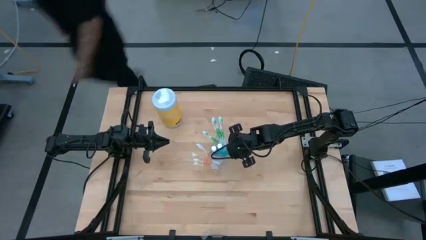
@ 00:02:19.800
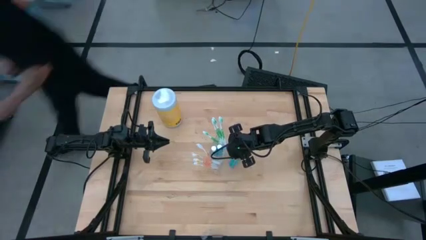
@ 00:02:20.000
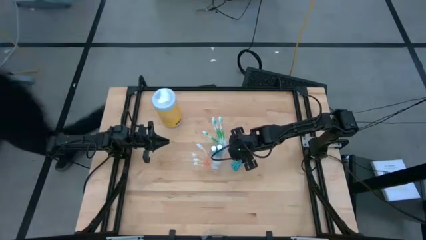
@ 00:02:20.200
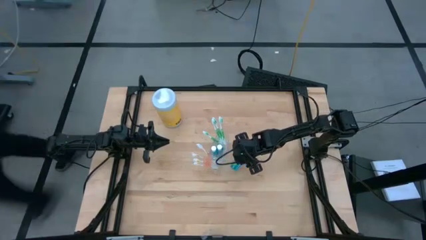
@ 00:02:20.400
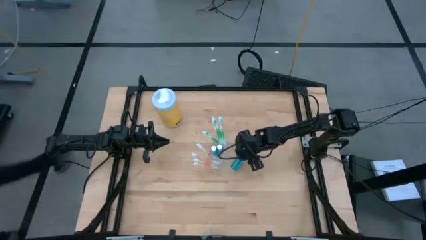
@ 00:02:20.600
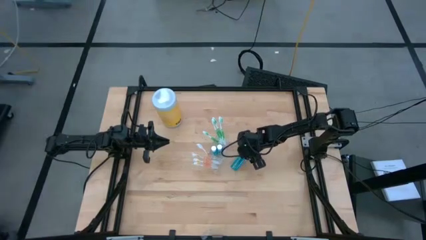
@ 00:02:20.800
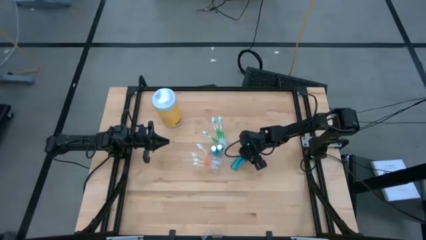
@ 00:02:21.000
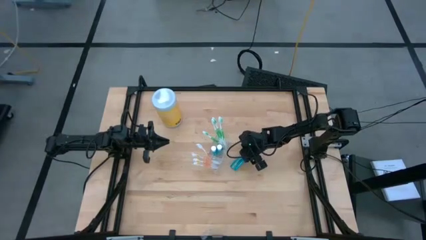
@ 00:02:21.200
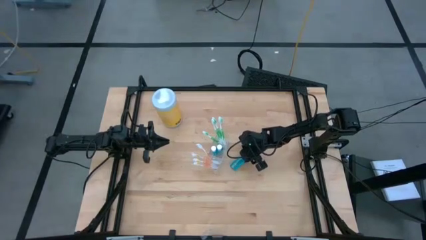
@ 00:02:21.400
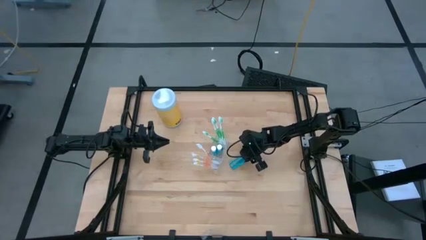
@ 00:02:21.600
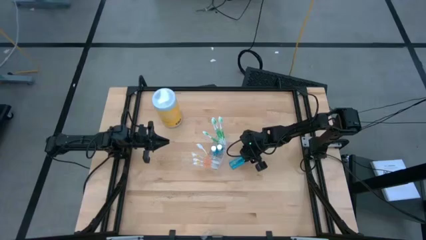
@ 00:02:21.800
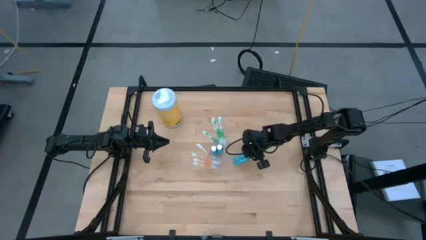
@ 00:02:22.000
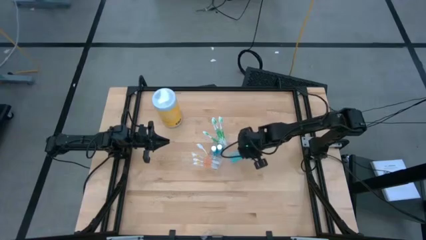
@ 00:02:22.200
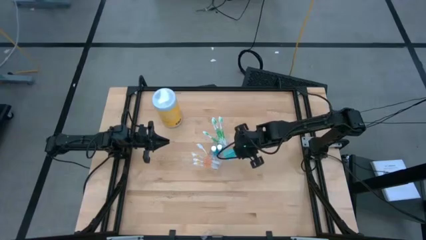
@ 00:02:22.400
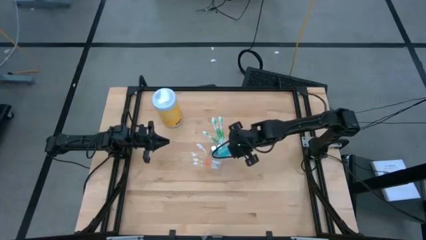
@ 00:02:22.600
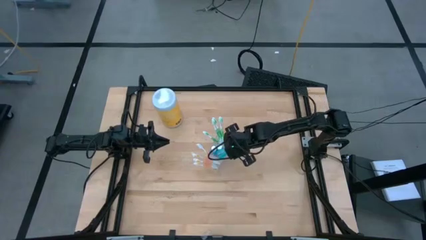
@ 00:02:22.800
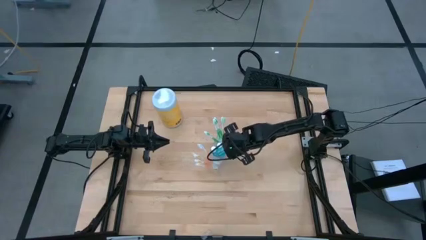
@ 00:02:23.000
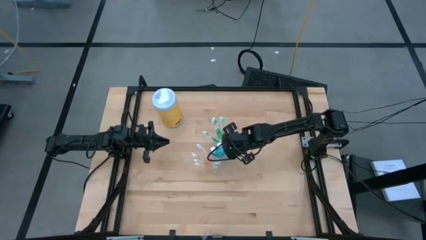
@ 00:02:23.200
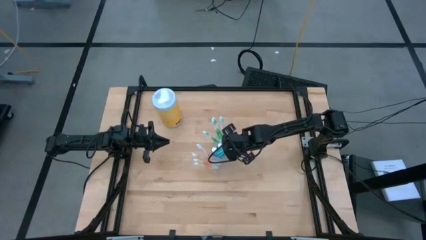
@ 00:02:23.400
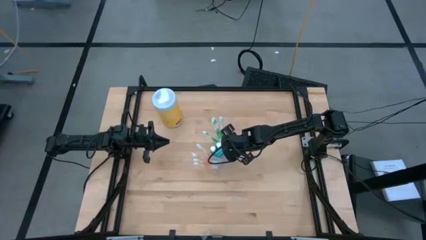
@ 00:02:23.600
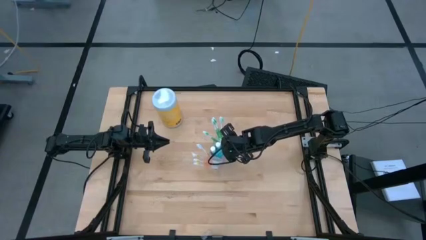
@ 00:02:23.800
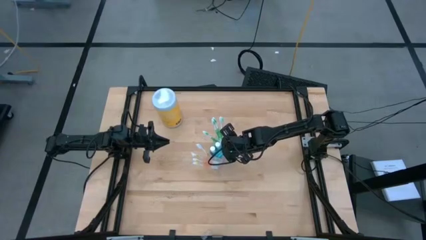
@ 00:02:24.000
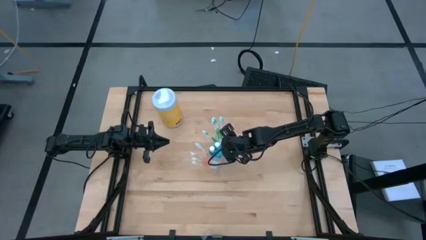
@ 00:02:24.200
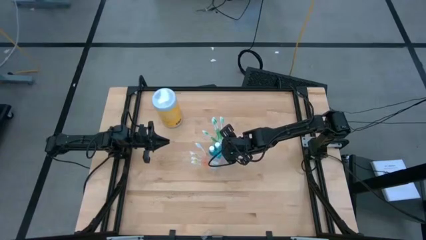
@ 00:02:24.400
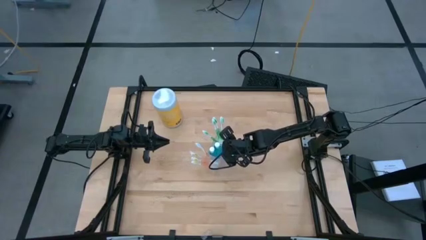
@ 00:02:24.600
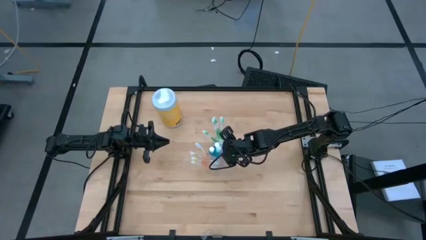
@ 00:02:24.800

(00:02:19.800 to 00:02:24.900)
Task: Pick & Place toothbrushing station
Put the blue mouthwash bottle into the transparent organizer

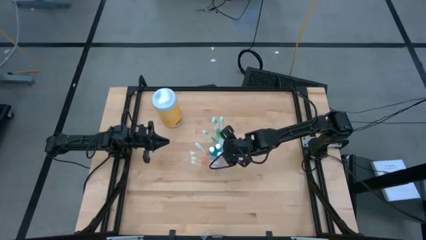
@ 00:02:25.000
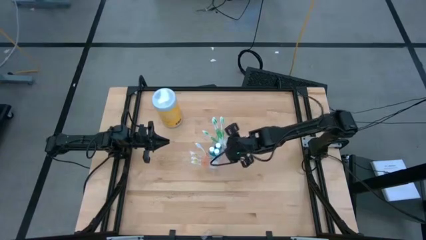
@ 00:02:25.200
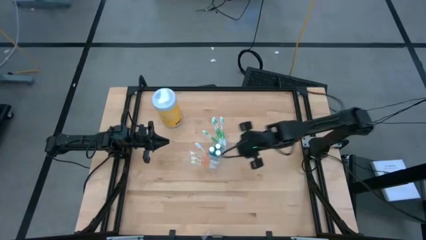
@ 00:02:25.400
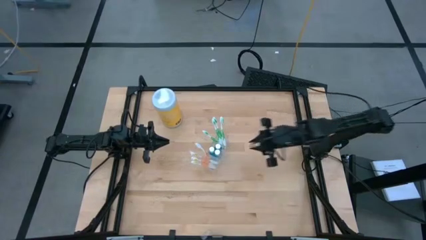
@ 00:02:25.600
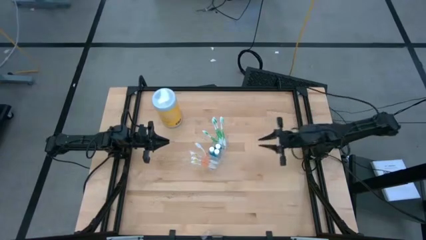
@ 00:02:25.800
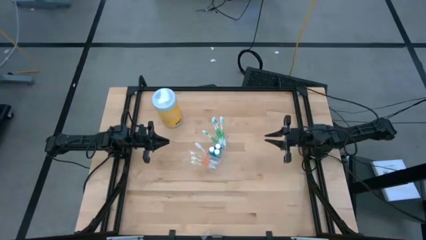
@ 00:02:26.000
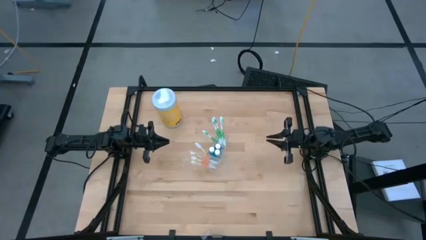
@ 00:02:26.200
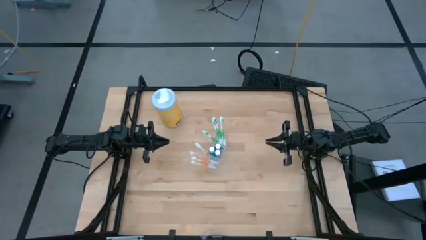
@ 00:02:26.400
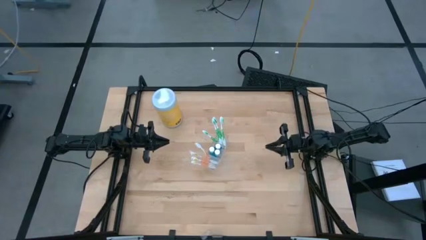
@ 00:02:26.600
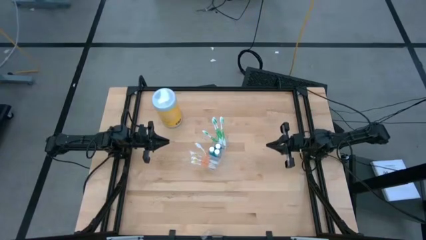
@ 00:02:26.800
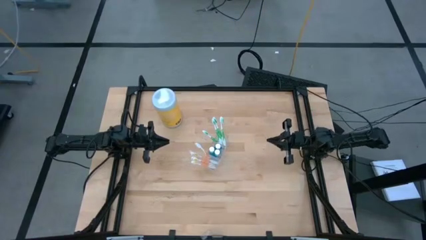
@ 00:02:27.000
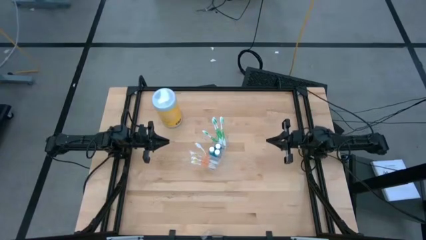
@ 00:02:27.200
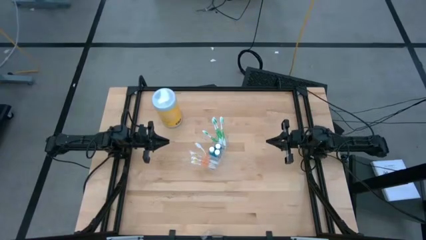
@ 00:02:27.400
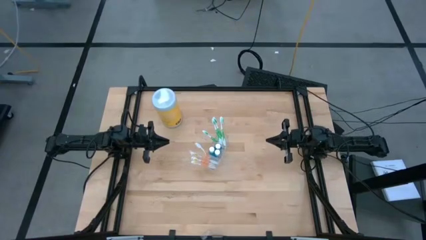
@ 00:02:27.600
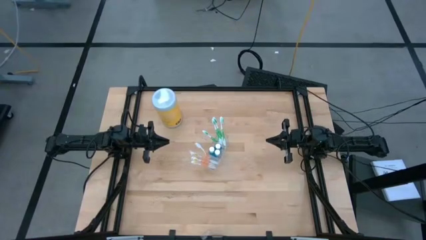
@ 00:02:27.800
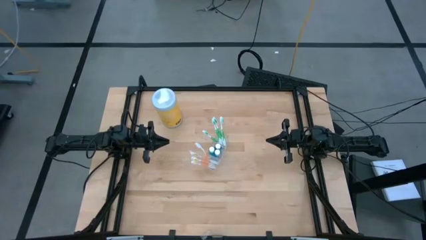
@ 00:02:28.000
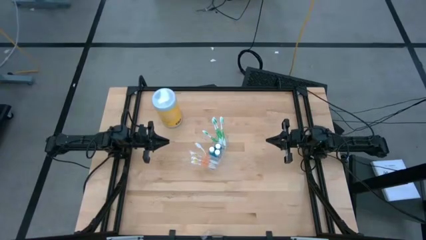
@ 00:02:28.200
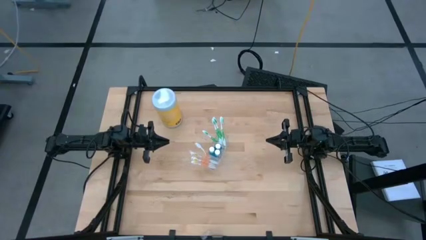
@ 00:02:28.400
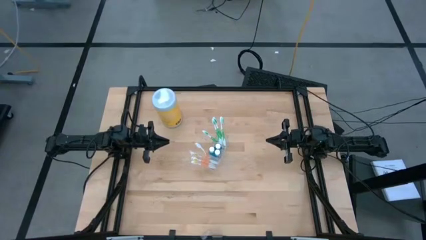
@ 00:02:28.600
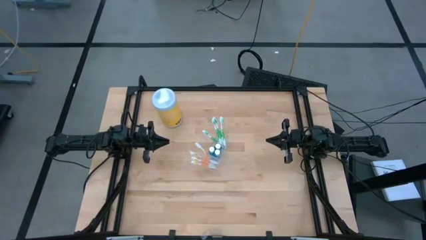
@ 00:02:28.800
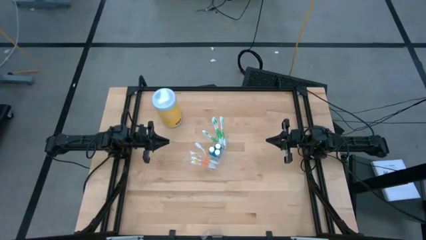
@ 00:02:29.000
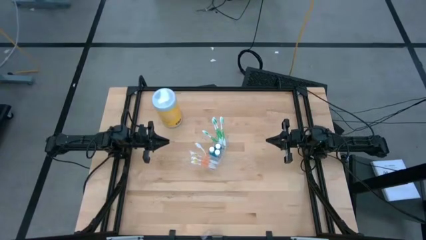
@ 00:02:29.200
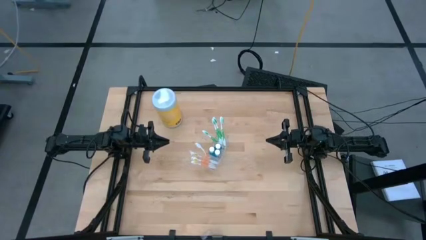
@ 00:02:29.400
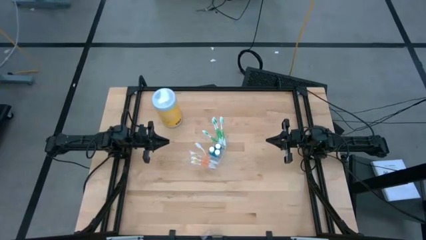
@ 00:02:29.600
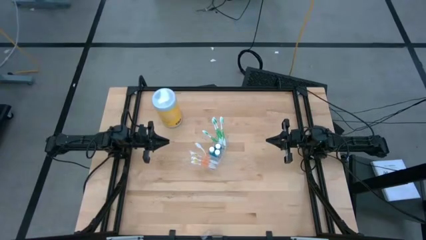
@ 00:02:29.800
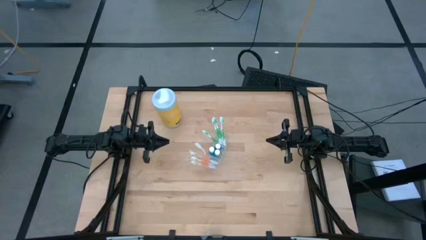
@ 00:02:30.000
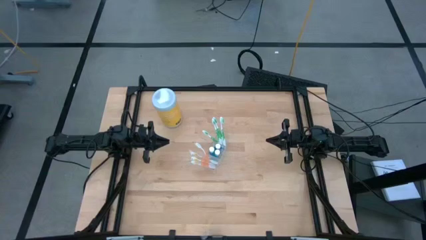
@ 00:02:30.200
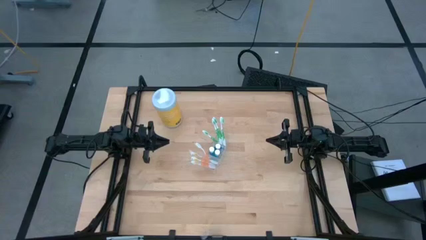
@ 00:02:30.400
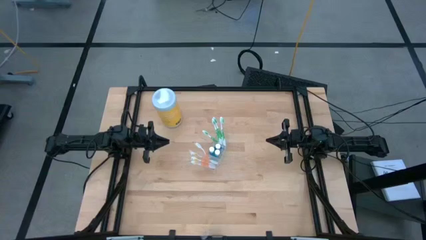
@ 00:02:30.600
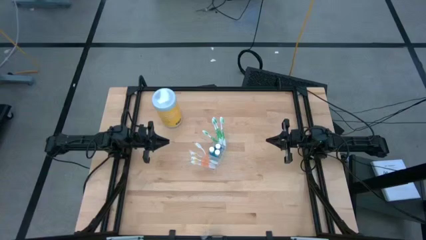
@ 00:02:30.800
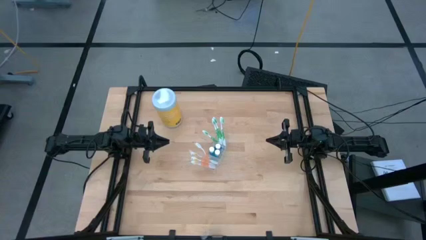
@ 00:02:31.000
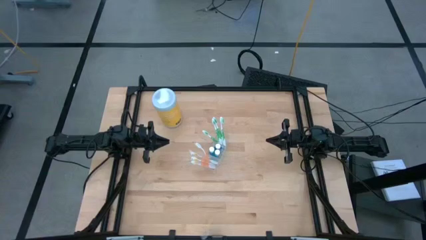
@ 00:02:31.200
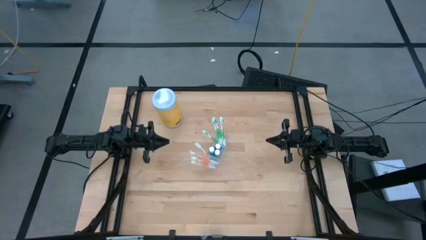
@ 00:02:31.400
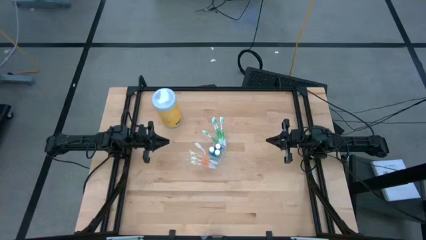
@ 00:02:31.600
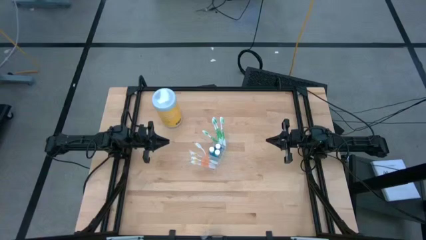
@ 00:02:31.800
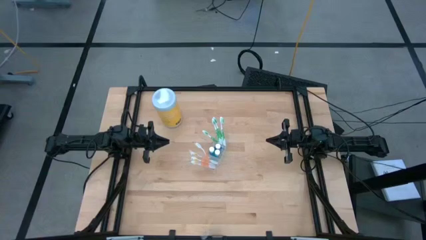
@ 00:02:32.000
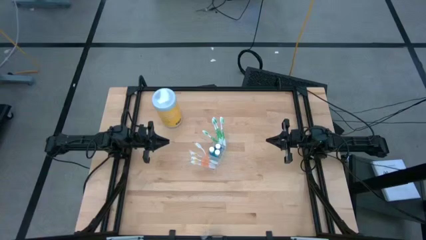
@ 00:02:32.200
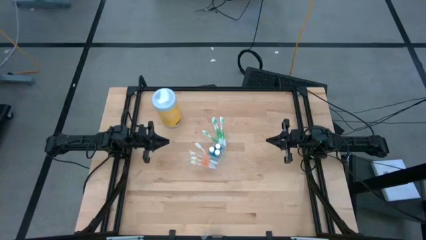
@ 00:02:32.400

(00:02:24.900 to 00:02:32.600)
Return to Home Position
